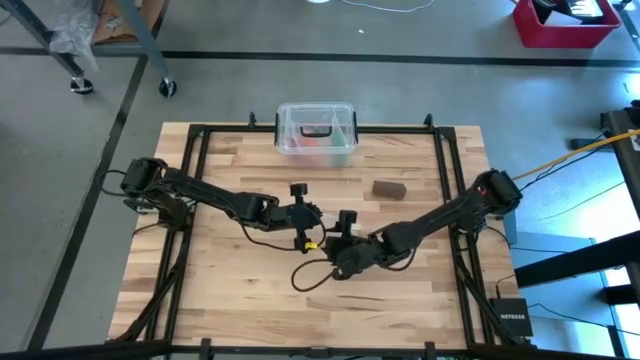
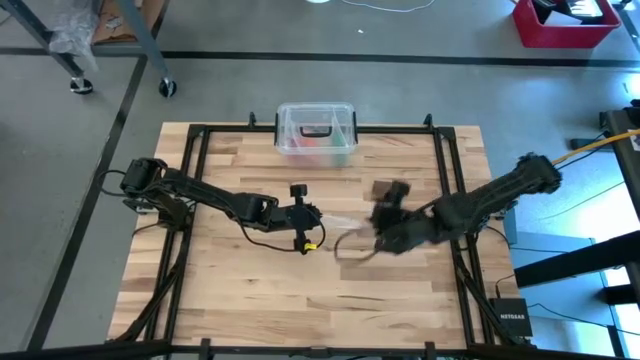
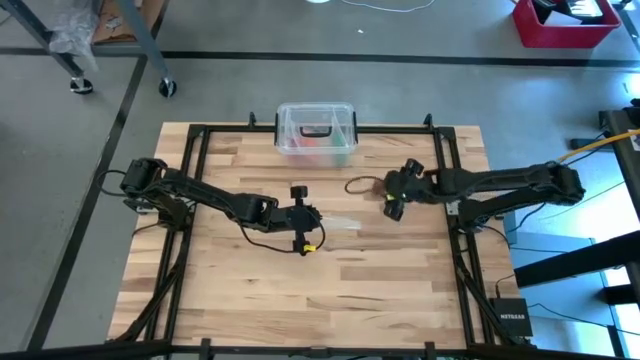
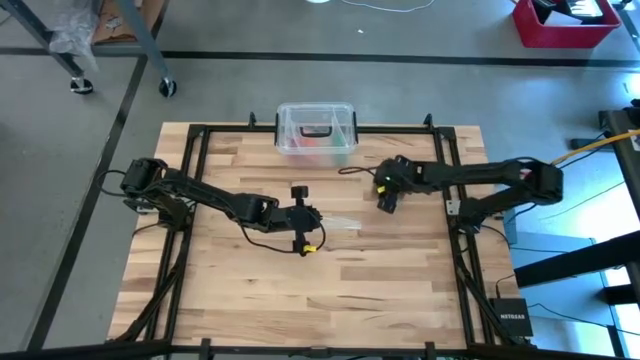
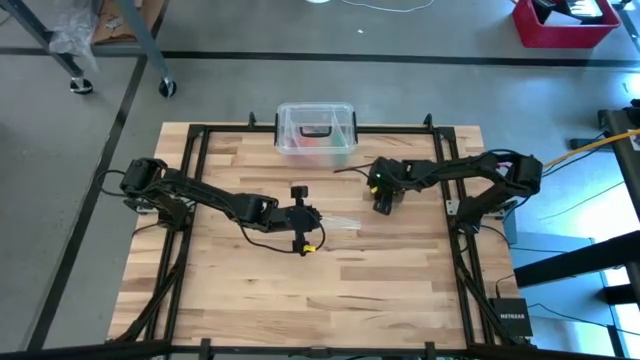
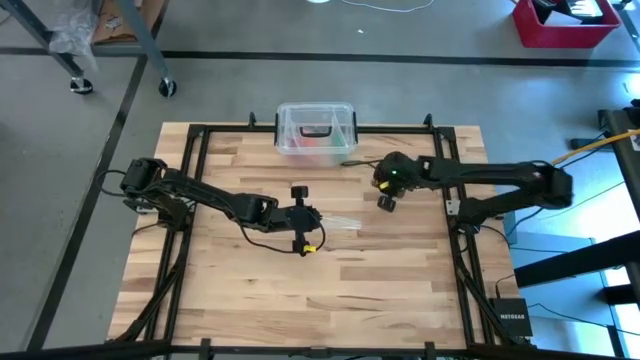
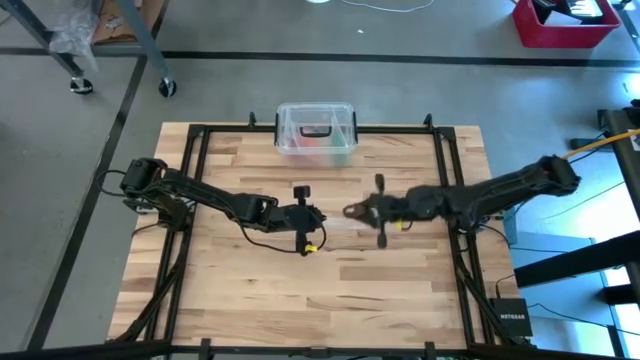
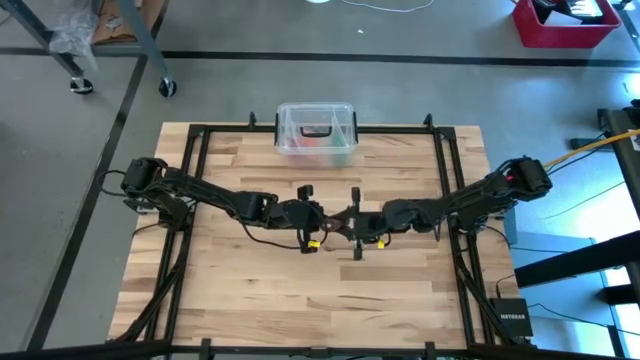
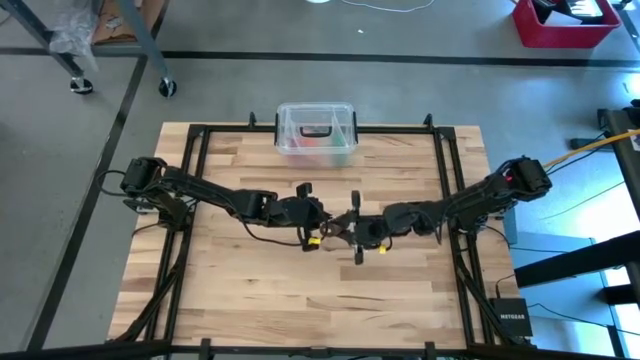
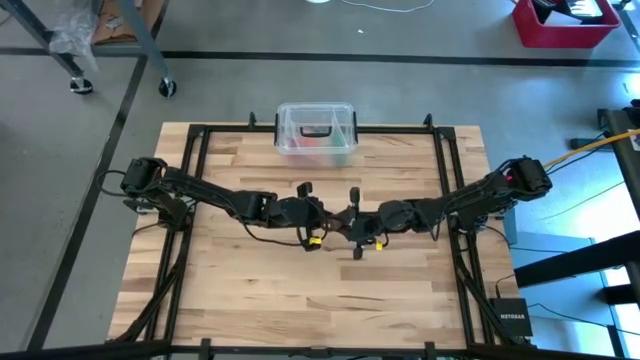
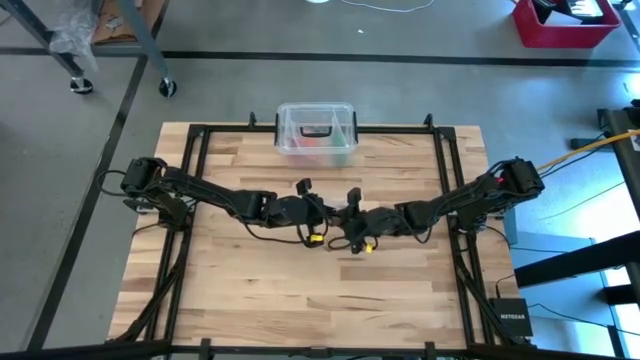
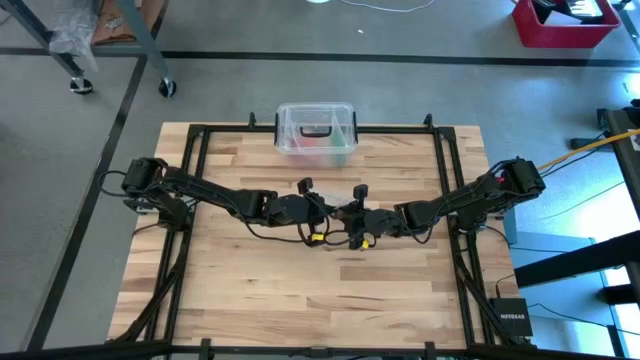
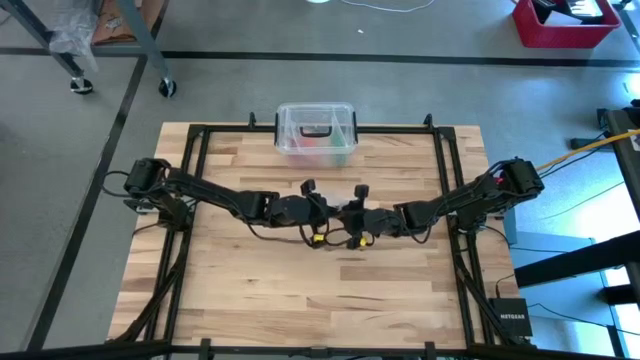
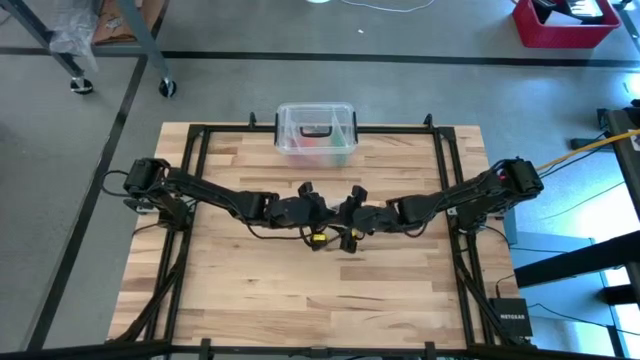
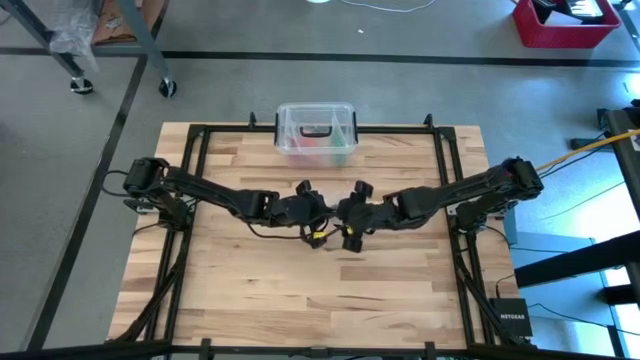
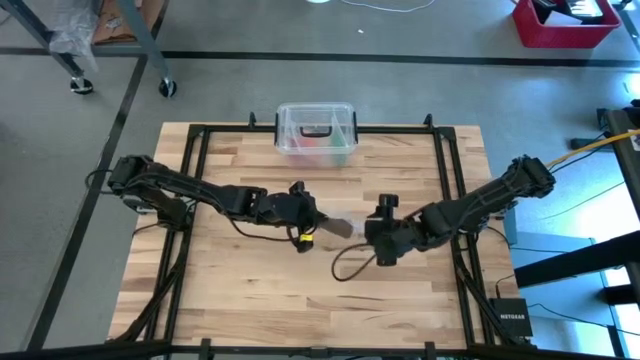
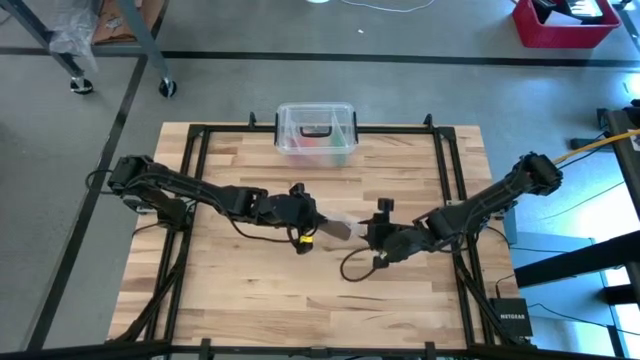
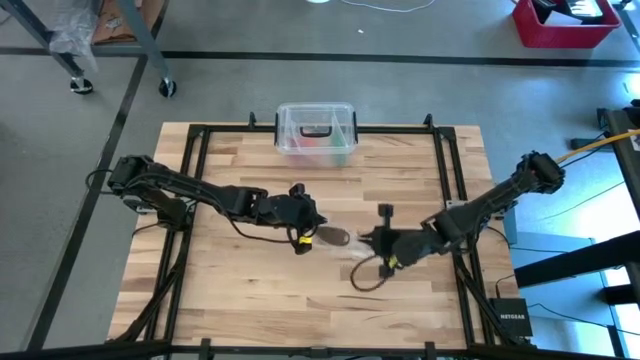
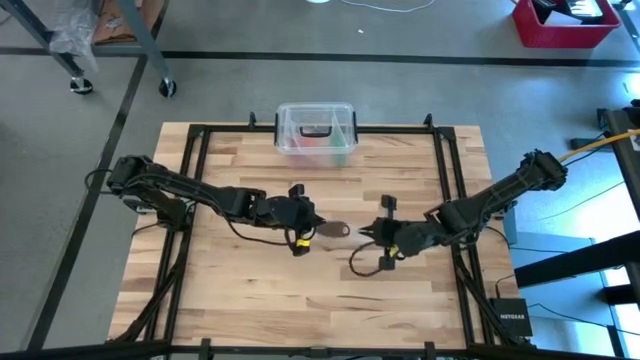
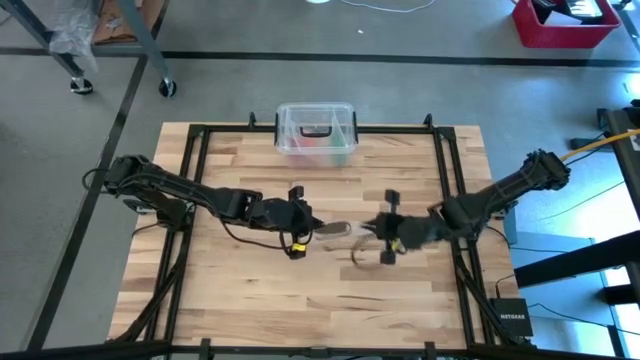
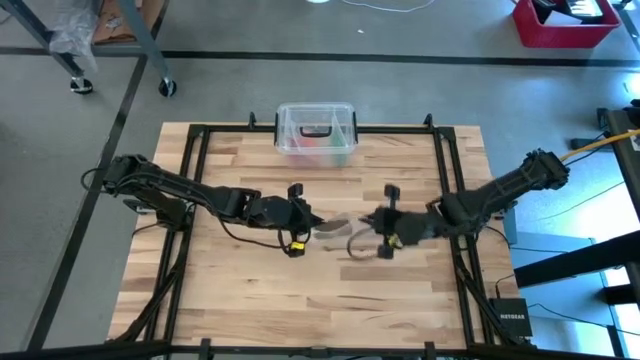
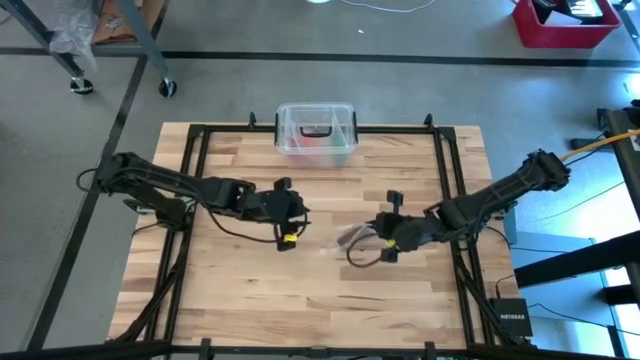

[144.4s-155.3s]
Task: Roll bandage
Put the brown bandage into the transparent zip bag

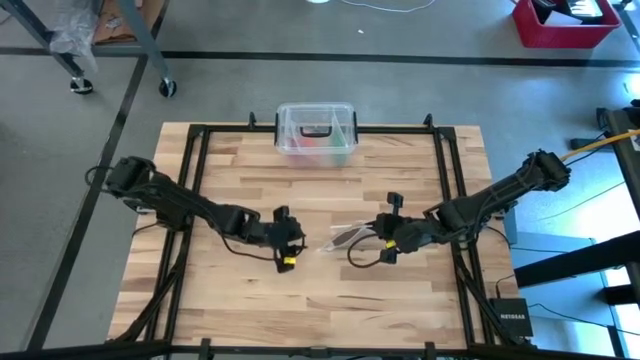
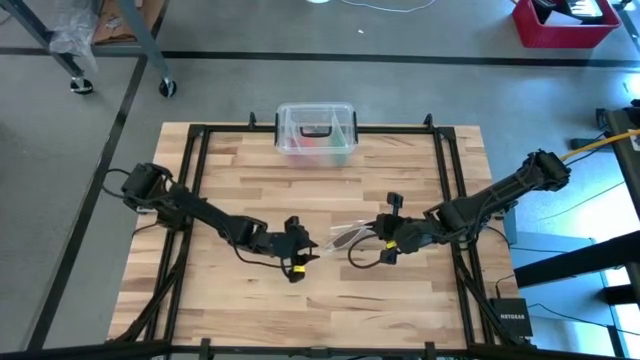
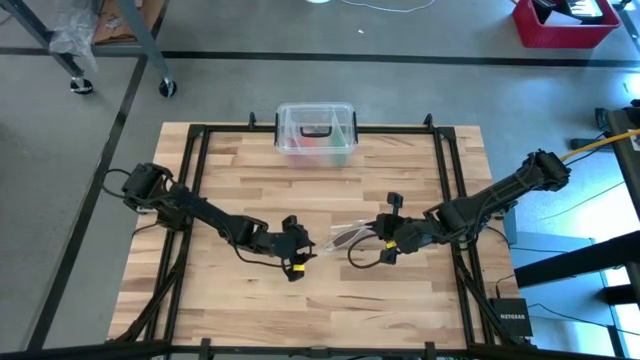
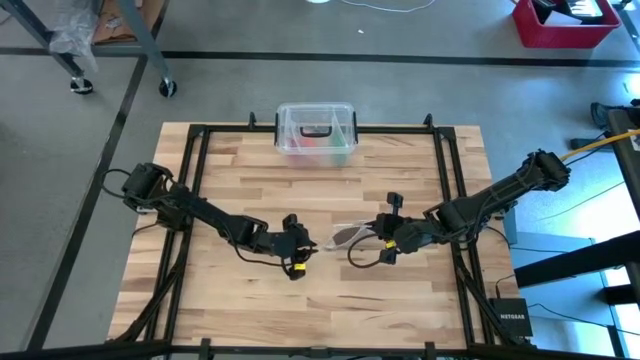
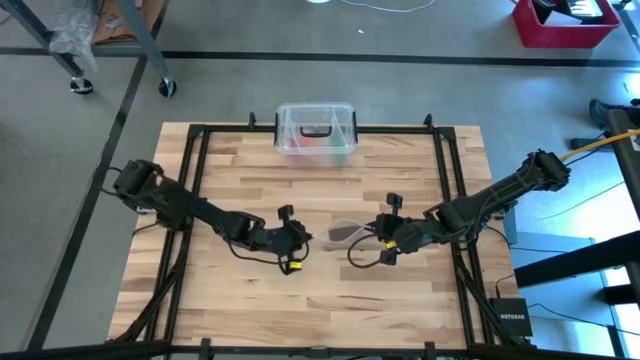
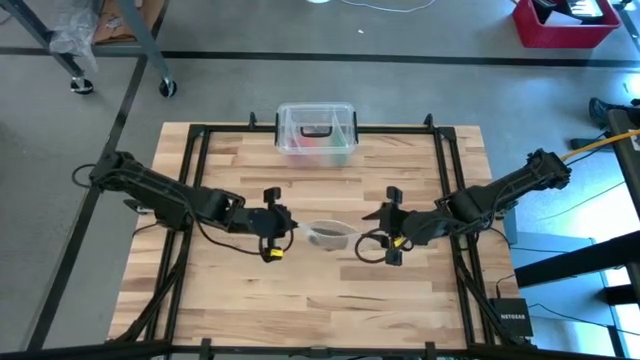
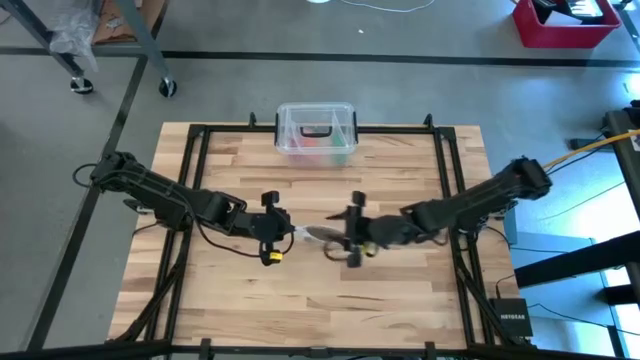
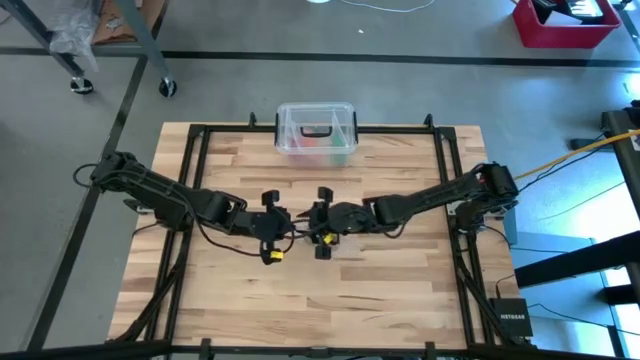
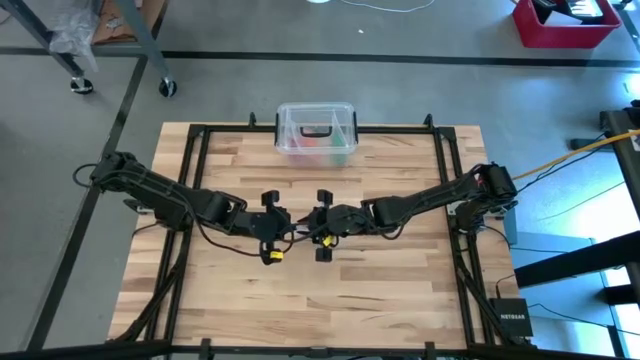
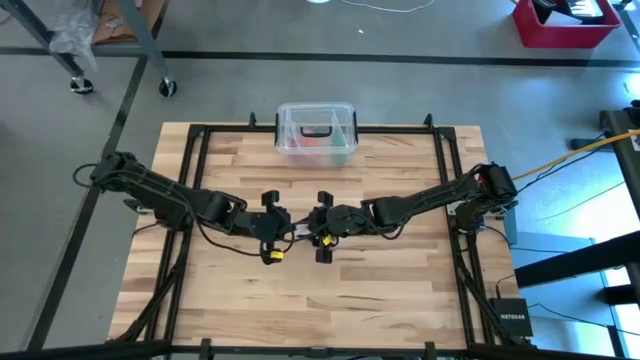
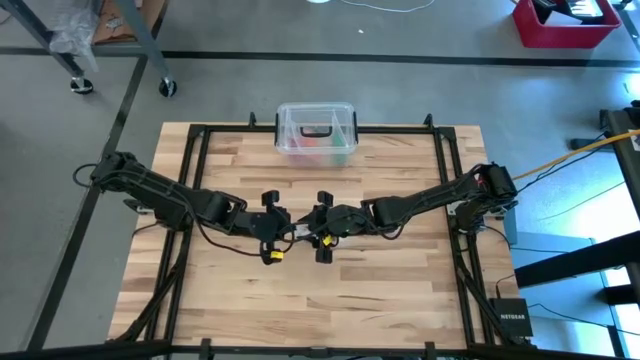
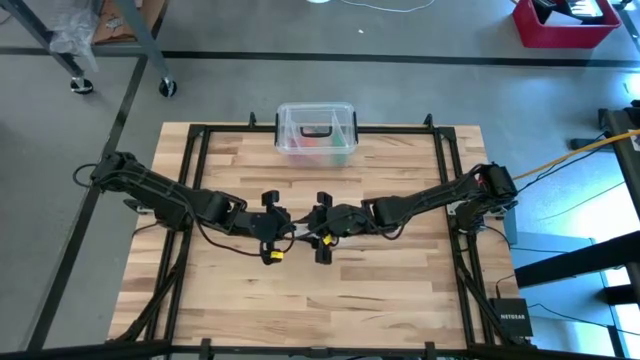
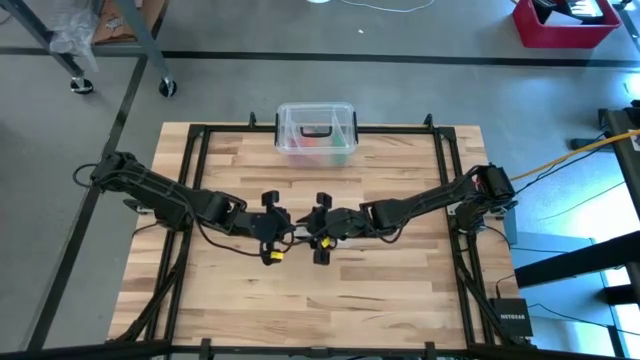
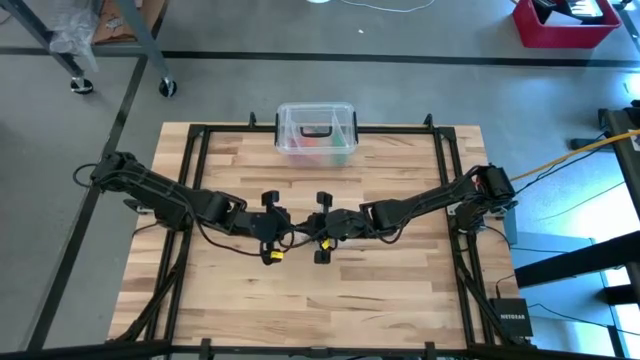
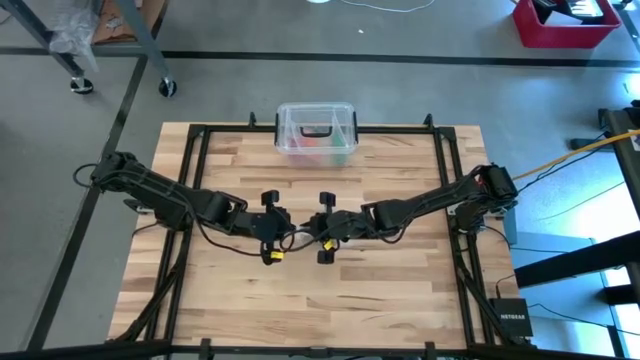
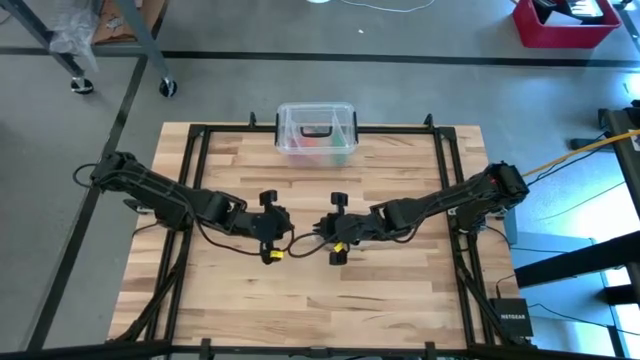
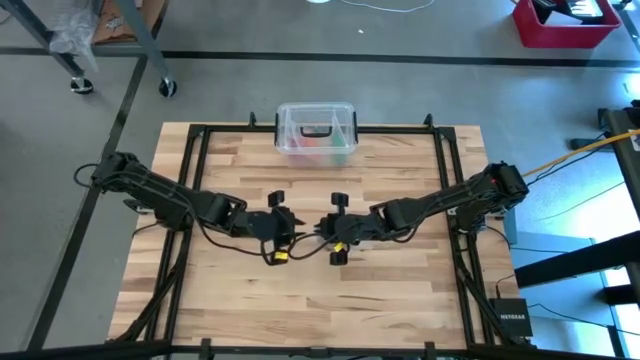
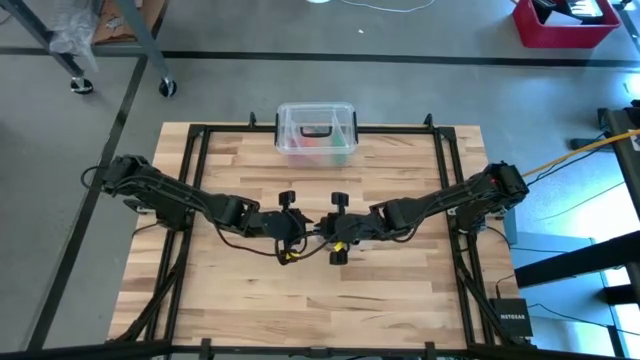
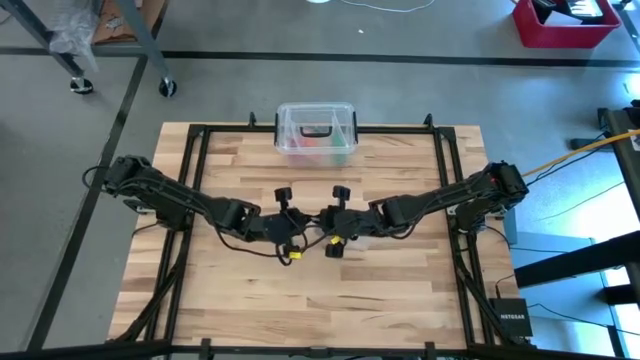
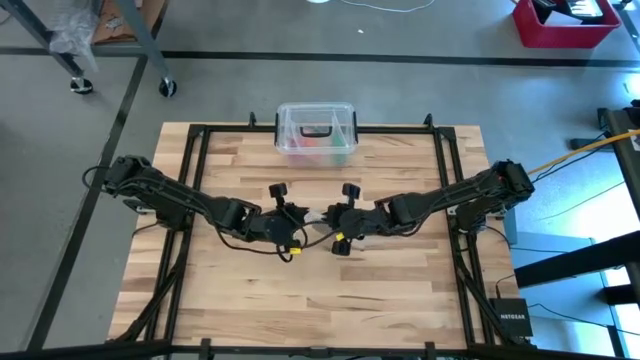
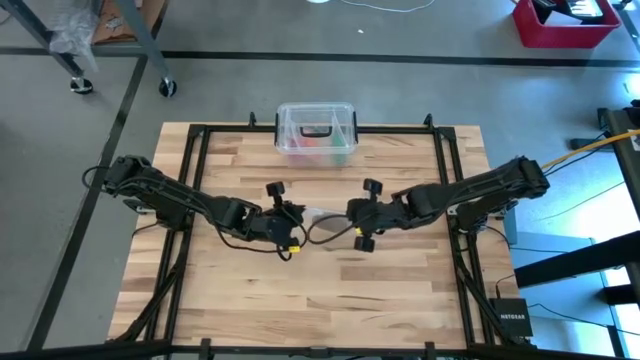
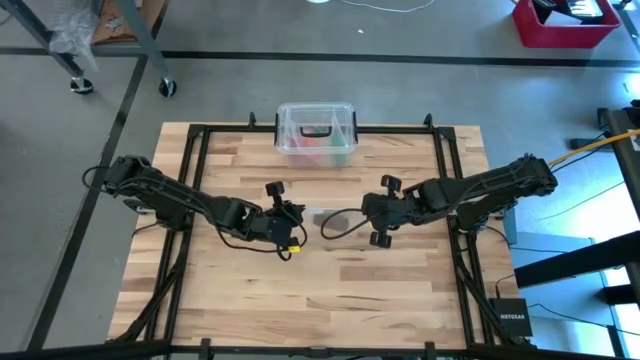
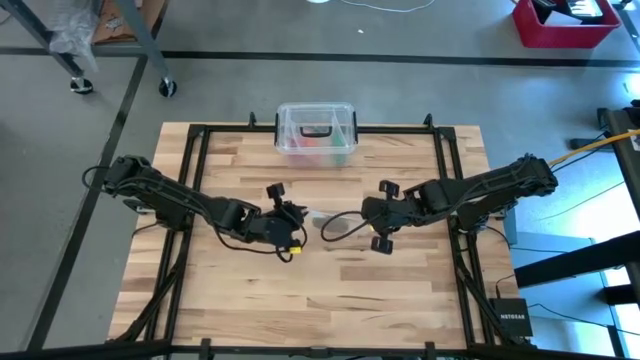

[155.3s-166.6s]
Close the transparent zip bag
